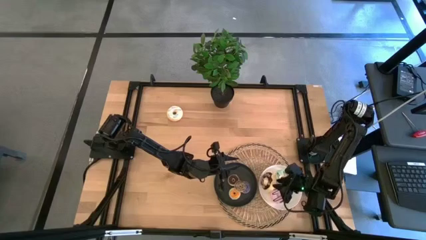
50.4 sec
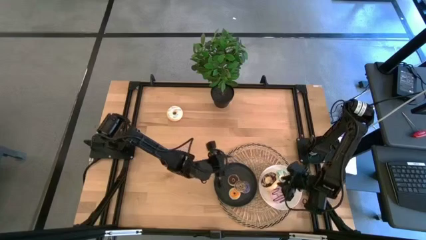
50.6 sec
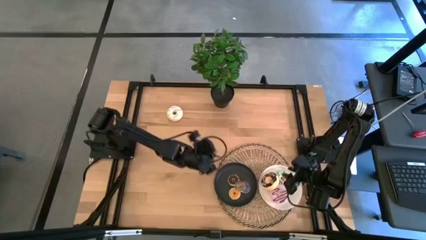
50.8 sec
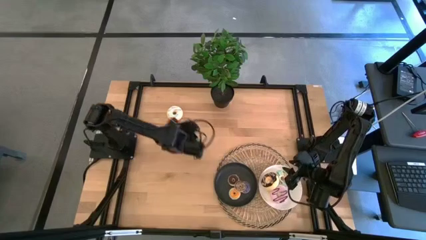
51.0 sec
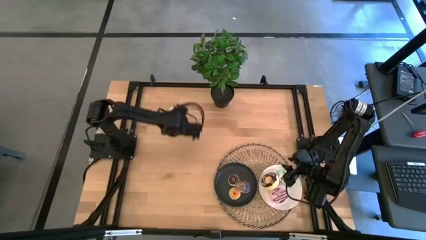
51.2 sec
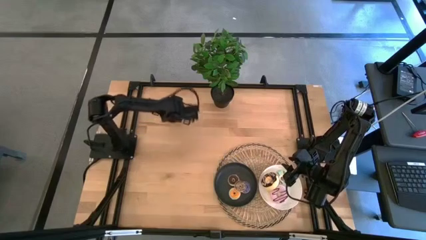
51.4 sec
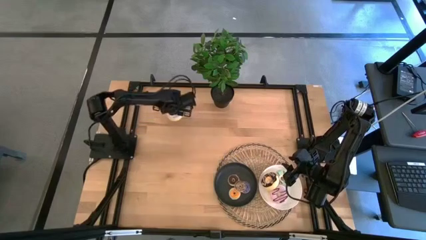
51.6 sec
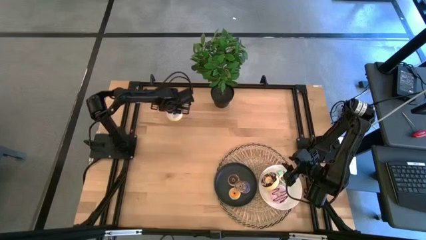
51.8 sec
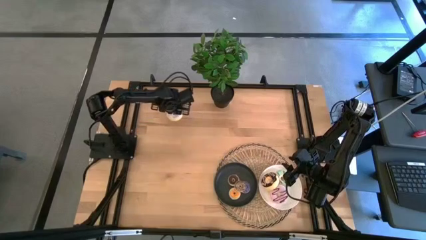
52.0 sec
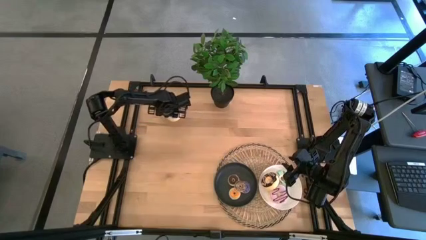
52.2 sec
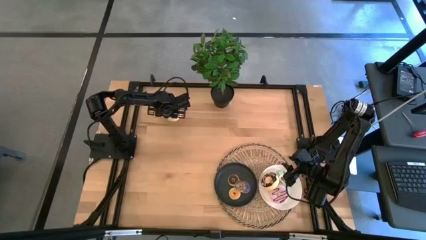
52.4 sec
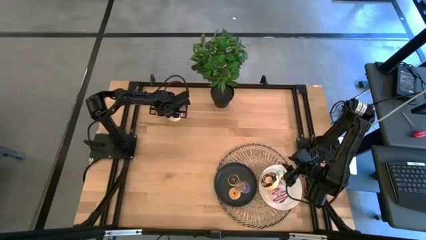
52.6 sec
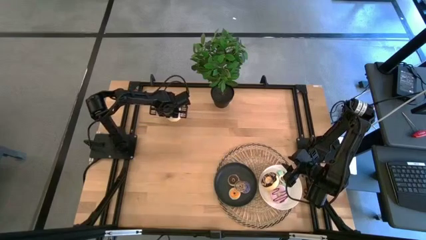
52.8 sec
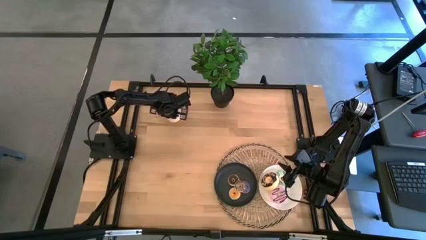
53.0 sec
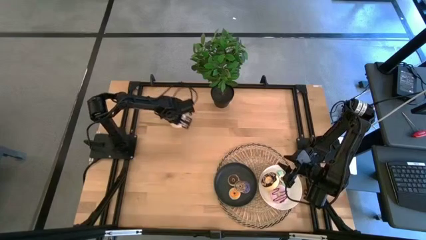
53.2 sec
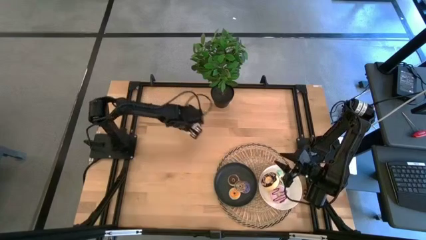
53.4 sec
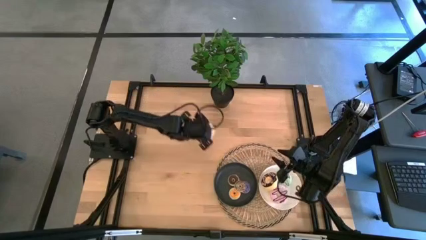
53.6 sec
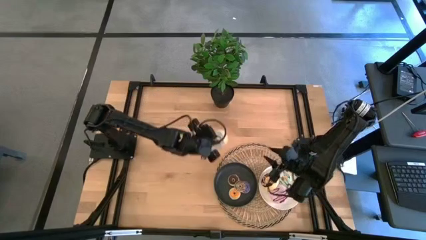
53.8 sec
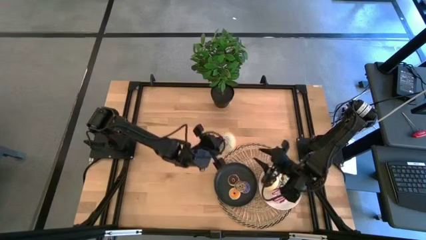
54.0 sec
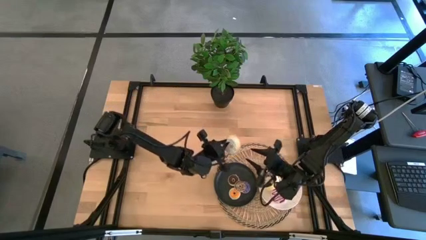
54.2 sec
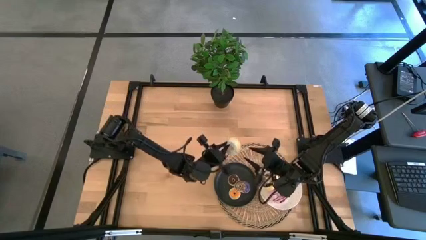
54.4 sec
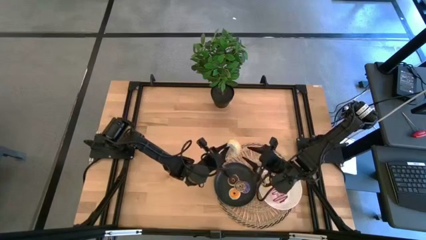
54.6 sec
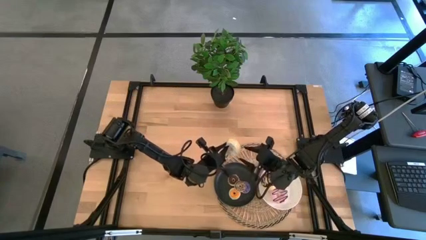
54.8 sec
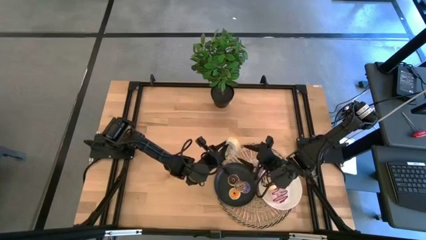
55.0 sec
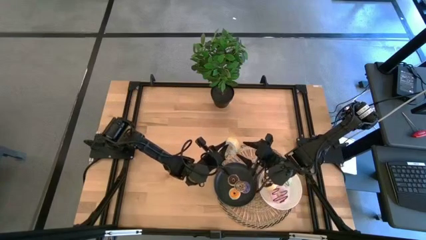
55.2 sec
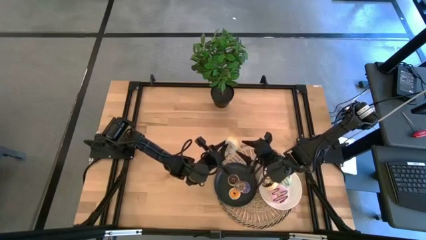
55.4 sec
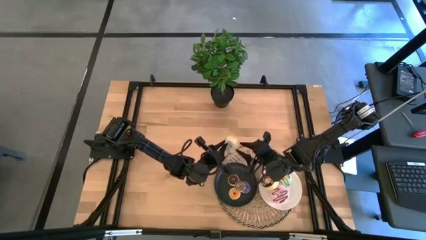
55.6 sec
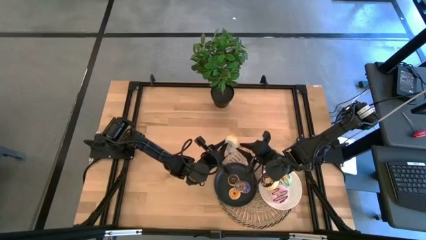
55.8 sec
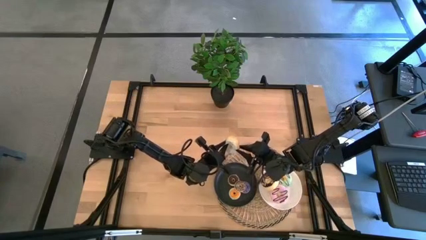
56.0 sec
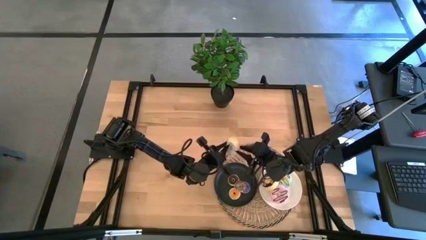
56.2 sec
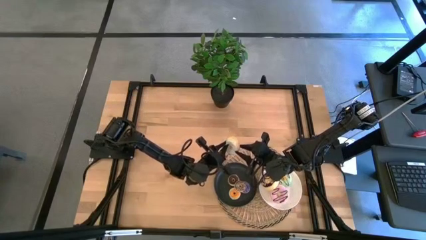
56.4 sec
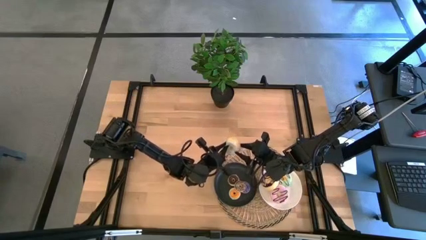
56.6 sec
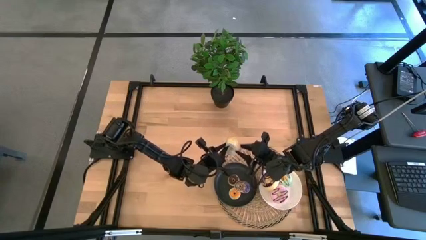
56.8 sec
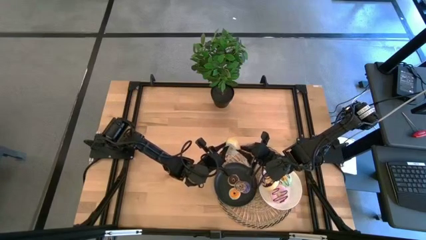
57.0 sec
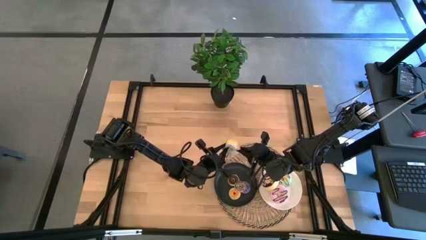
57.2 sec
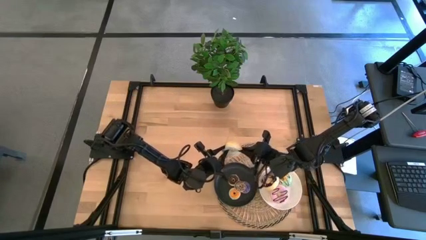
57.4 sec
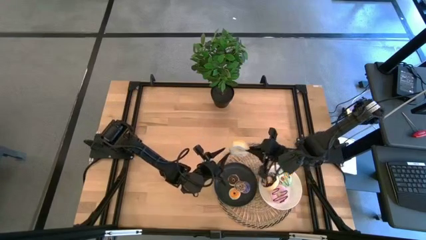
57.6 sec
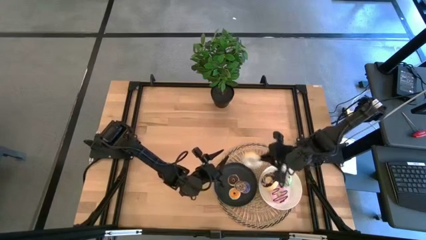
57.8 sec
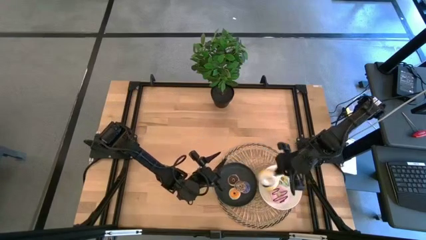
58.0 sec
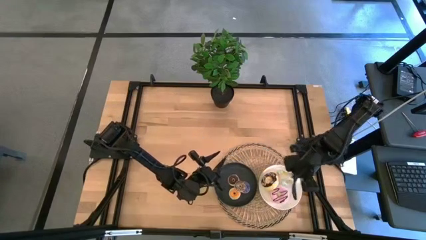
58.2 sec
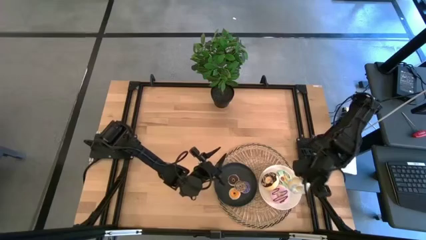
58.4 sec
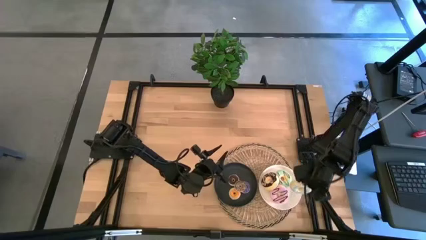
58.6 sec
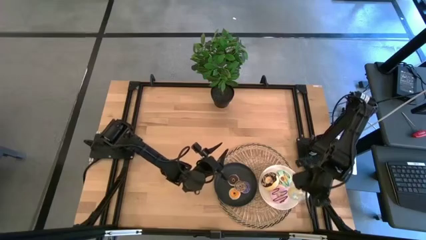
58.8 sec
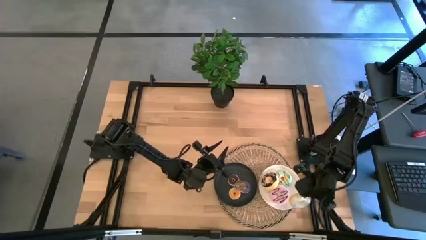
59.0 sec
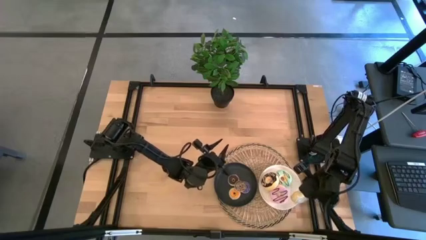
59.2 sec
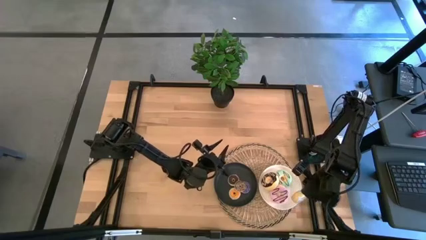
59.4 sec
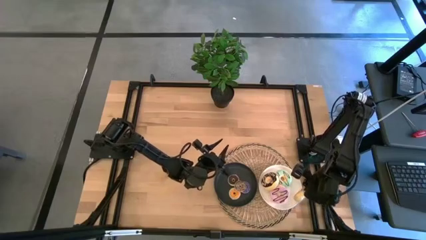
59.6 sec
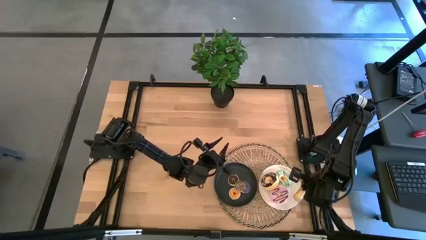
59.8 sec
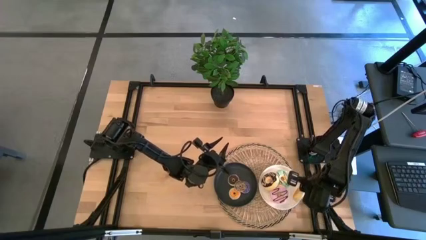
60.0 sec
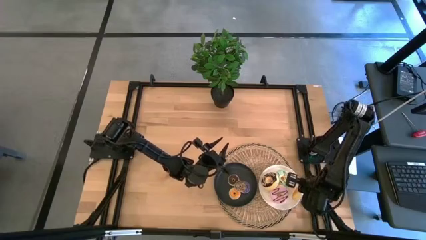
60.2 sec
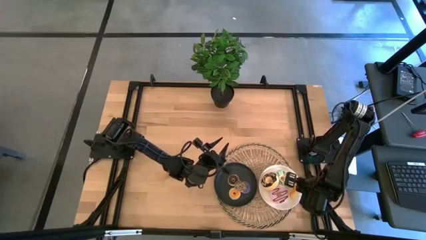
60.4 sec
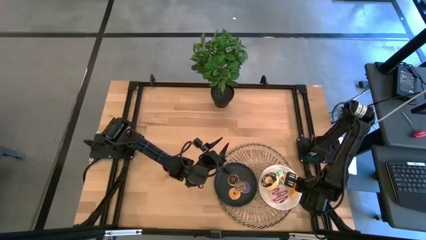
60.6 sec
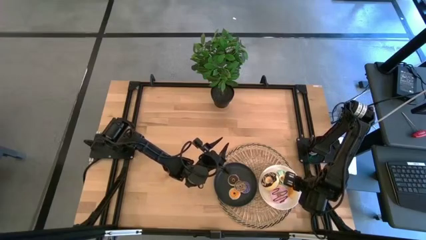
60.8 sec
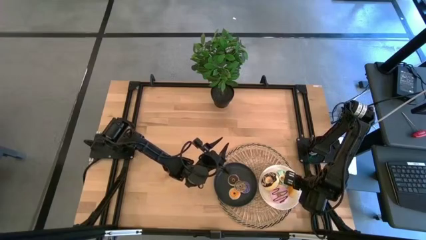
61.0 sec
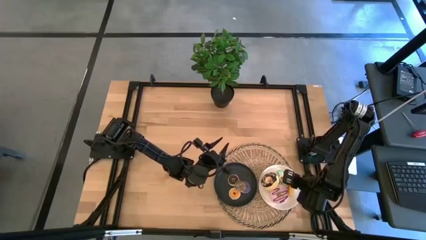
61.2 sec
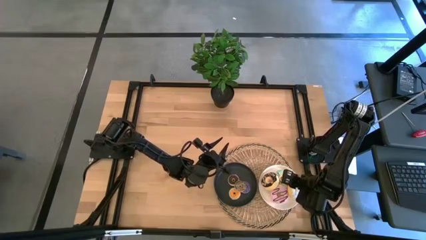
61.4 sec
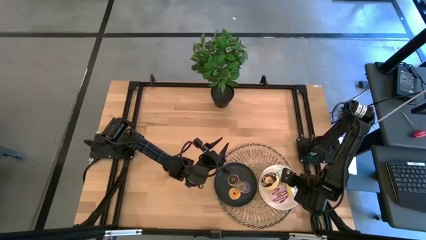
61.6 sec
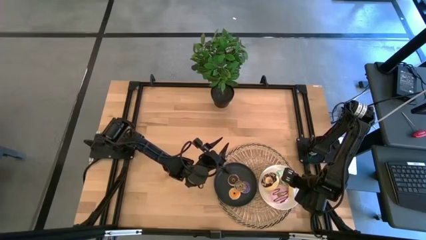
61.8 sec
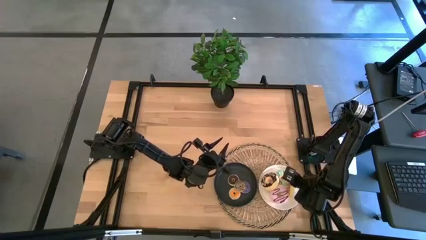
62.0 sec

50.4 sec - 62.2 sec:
Task: Pick & Place donuts
Put the big white donut on the white plate
